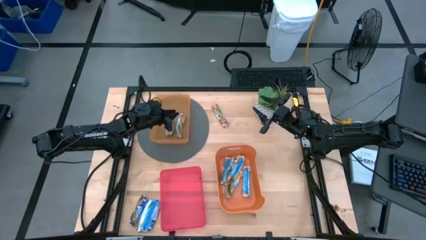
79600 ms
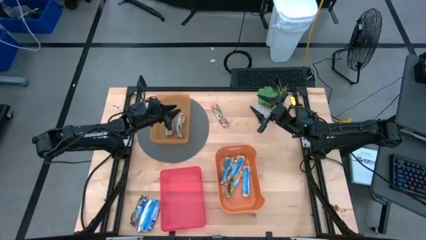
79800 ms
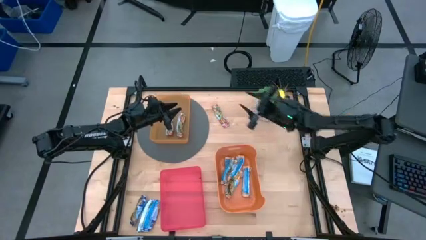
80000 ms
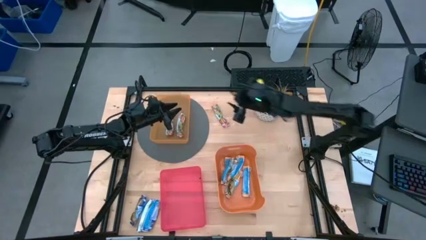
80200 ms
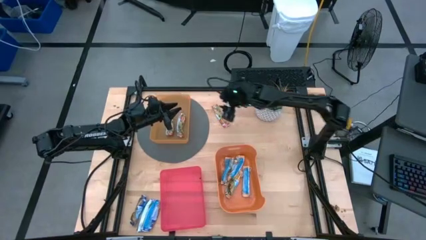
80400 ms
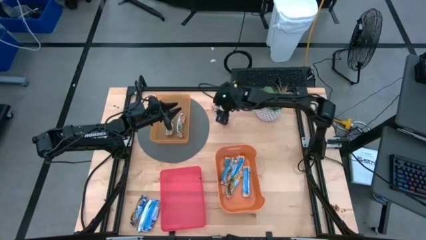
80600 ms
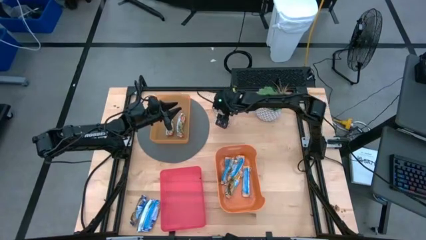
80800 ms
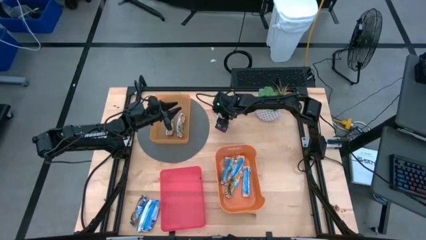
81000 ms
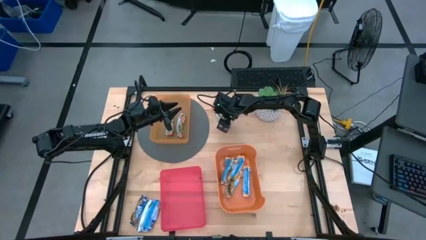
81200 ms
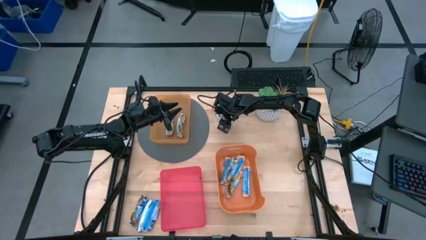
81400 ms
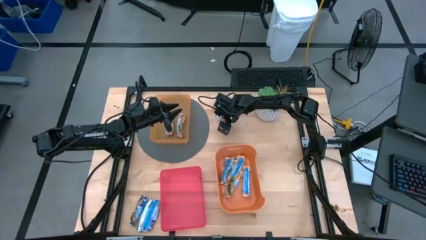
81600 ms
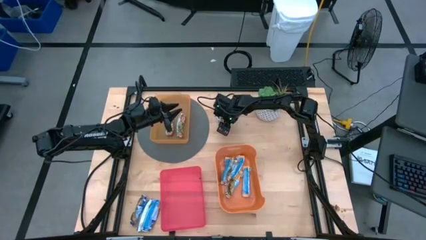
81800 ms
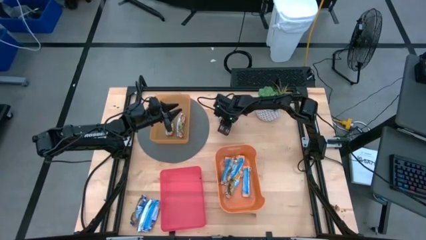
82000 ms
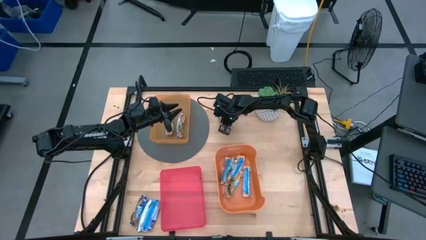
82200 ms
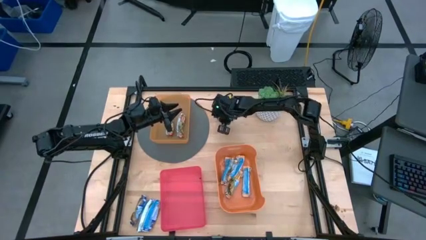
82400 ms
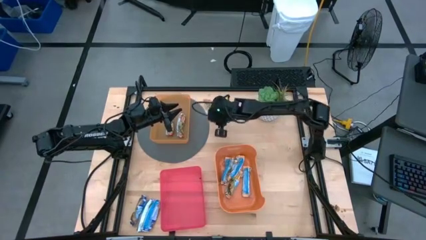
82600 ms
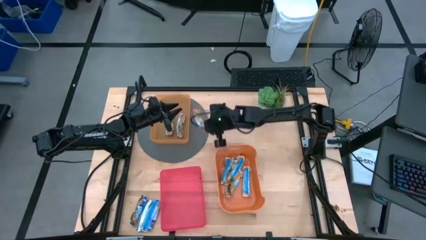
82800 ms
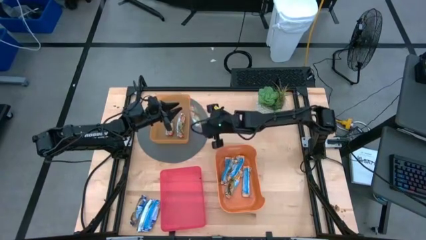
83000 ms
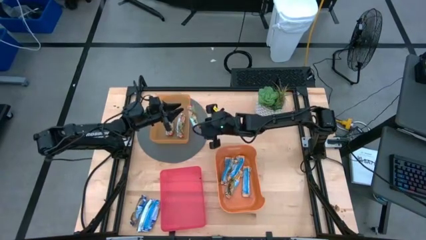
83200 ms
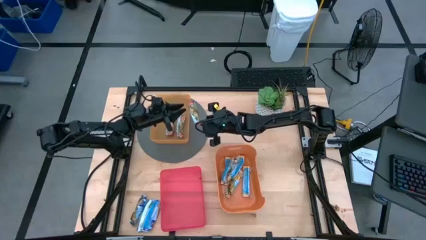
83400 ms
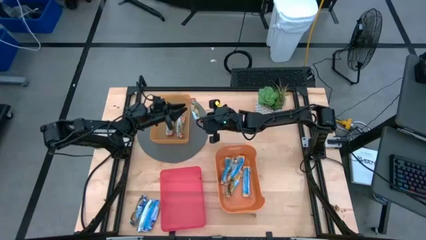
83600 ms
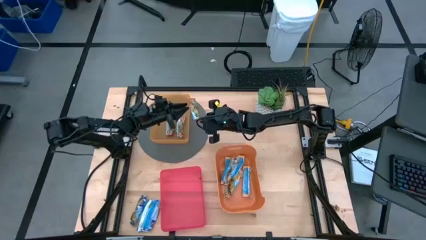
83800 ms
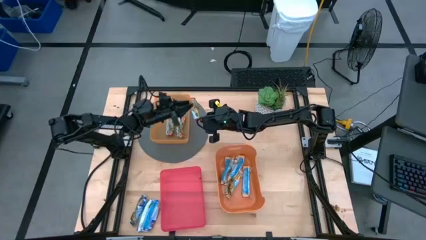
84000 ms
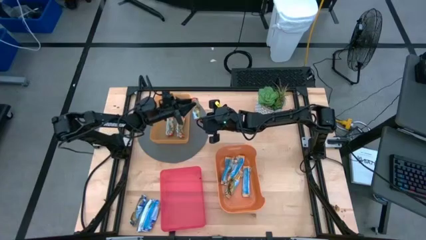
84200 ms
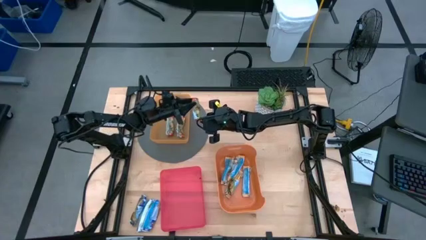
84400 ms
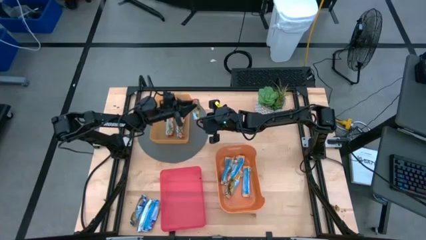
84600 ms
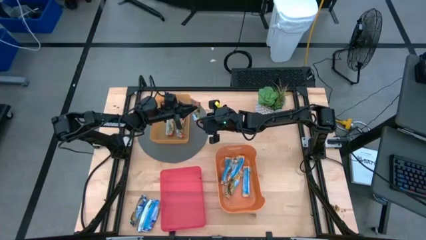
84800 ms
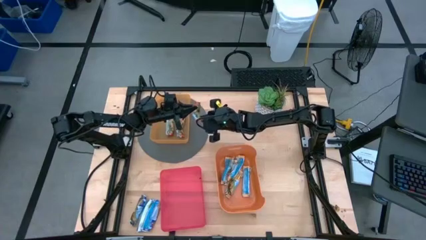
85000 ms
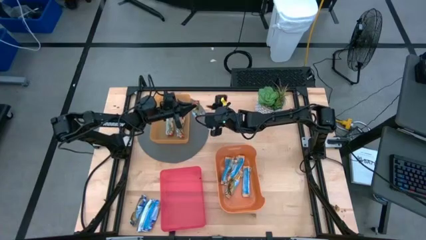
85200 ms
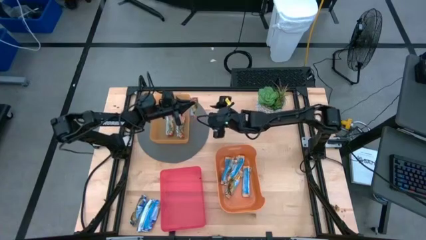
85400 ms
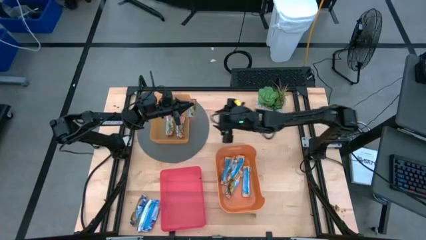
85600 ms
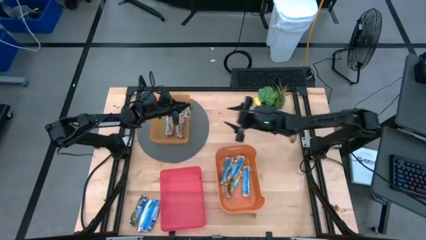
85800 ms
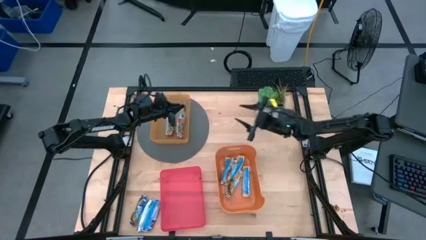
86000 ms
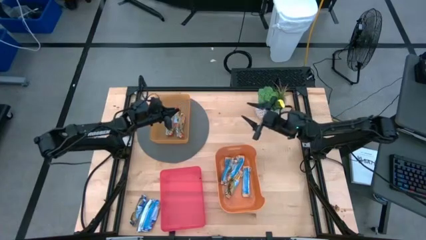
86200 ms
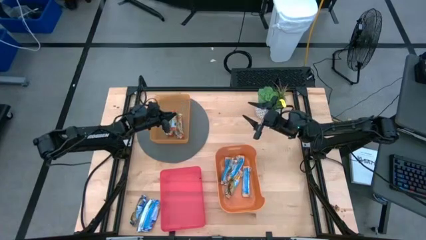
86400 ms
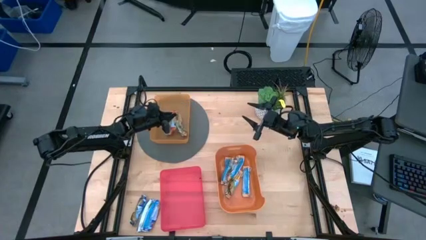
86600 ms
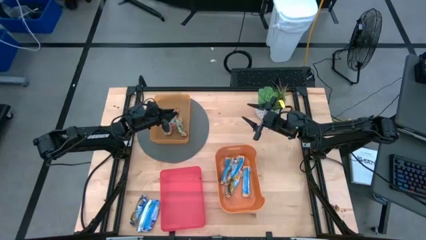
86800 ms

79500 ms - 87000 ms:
Task: Pick and place Granola Bars by type
Put the red granola bar into the light orange bin

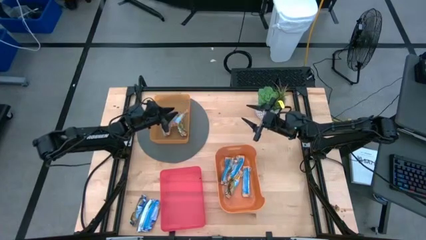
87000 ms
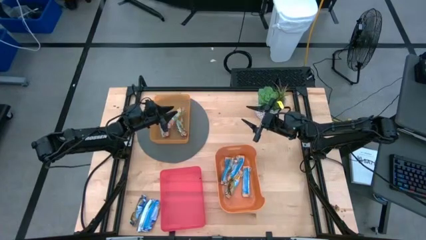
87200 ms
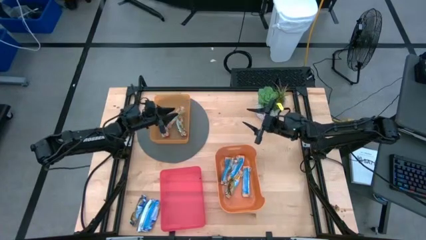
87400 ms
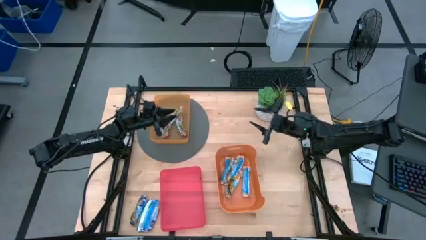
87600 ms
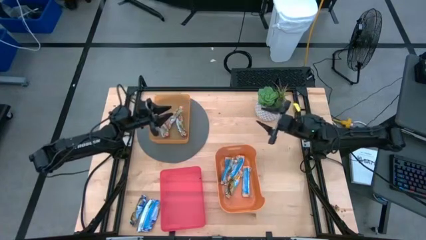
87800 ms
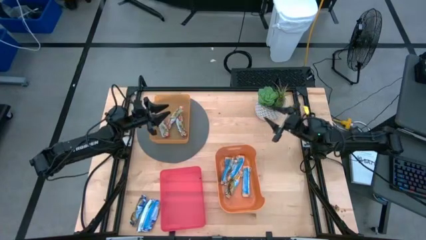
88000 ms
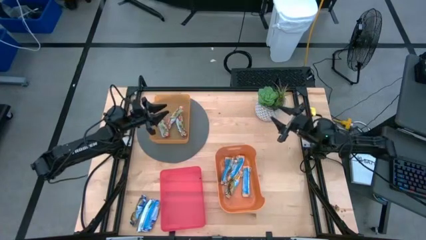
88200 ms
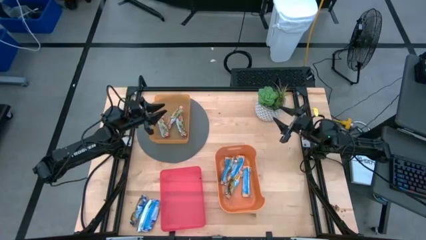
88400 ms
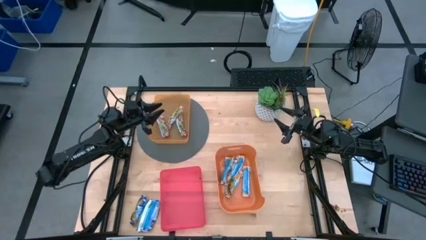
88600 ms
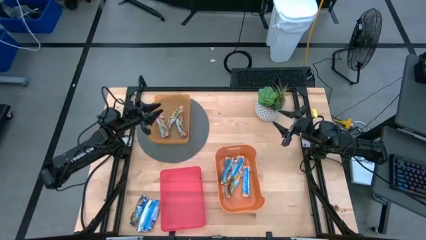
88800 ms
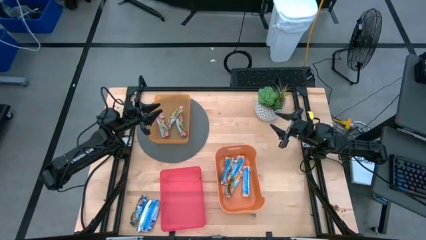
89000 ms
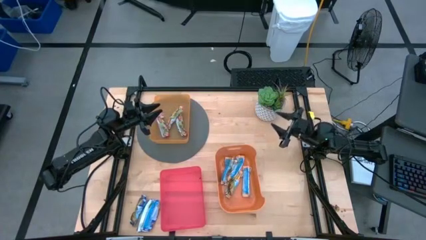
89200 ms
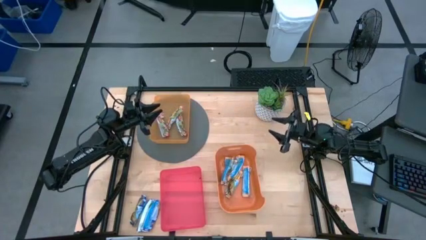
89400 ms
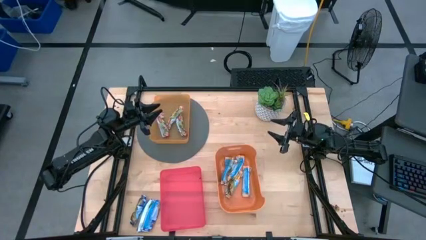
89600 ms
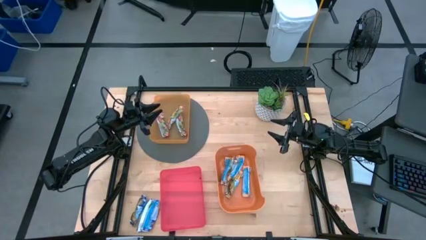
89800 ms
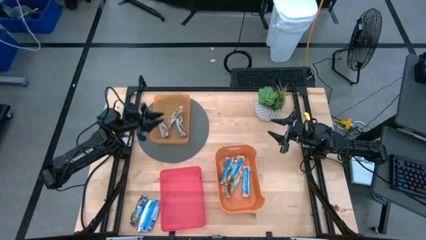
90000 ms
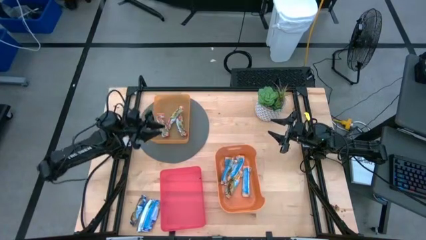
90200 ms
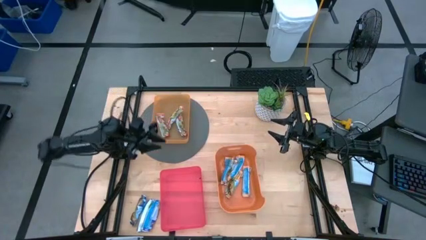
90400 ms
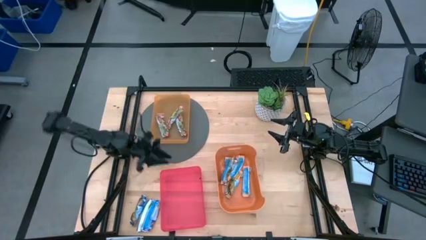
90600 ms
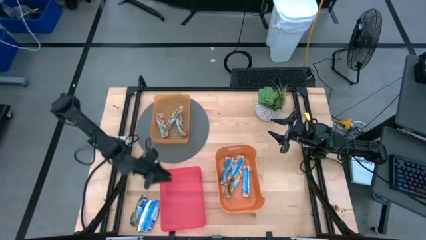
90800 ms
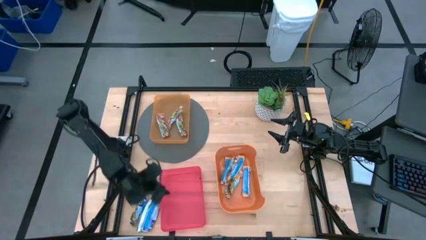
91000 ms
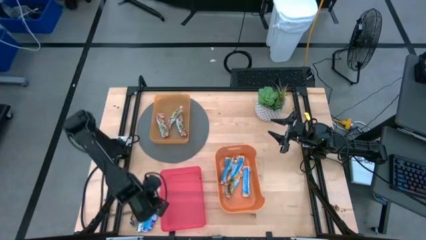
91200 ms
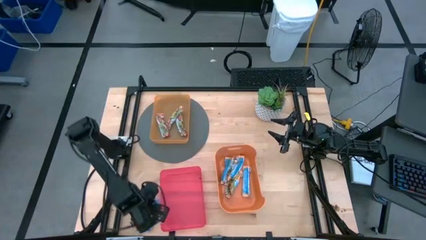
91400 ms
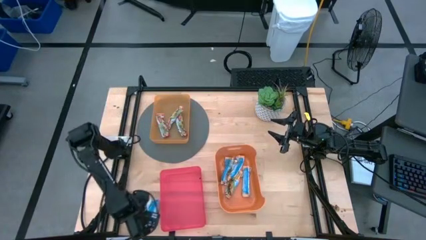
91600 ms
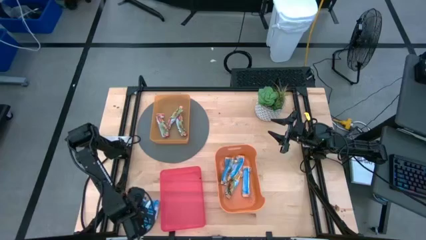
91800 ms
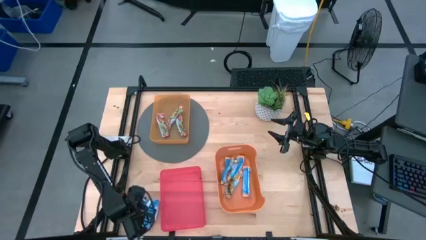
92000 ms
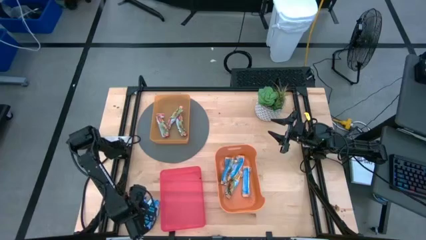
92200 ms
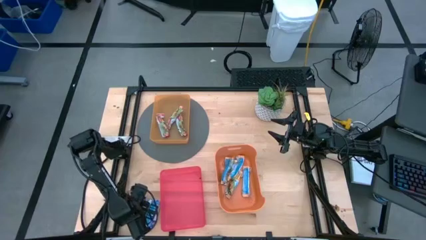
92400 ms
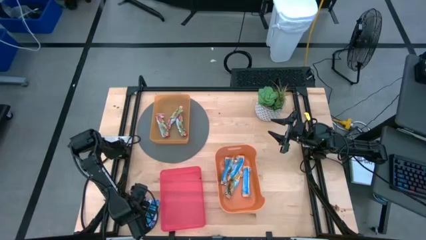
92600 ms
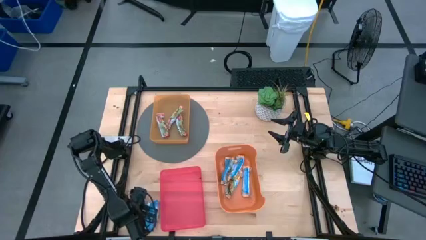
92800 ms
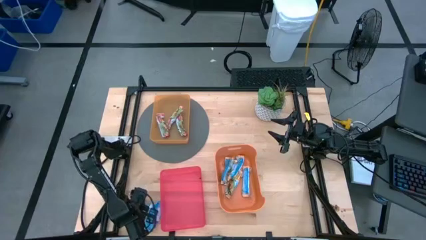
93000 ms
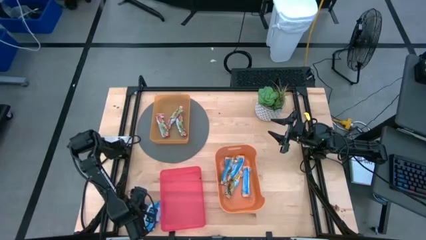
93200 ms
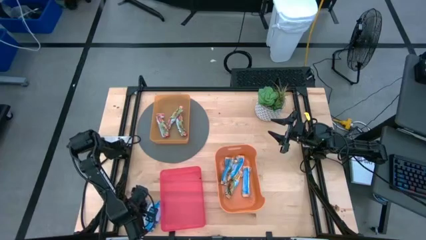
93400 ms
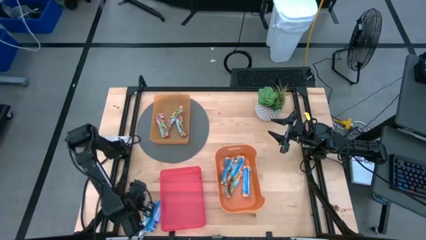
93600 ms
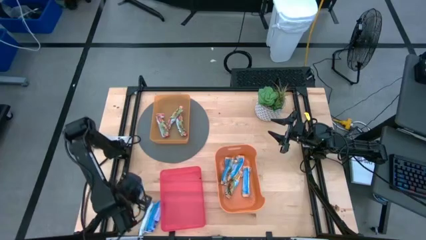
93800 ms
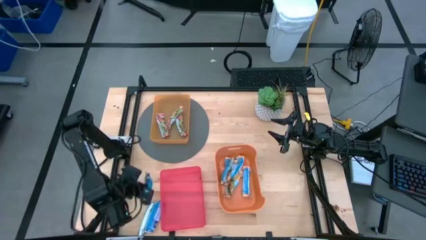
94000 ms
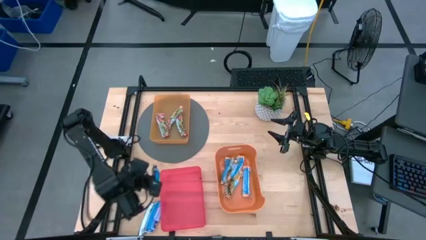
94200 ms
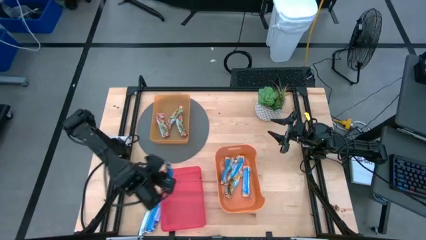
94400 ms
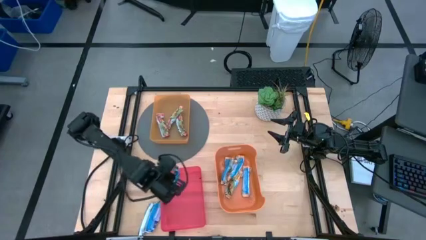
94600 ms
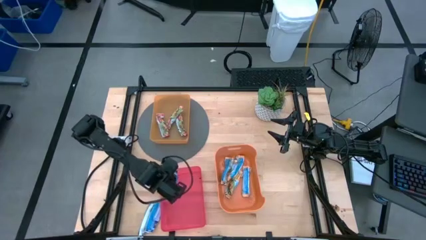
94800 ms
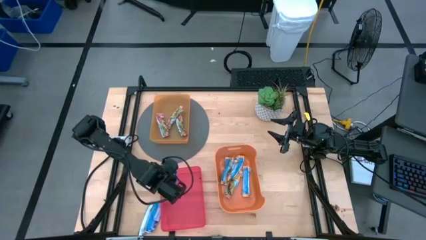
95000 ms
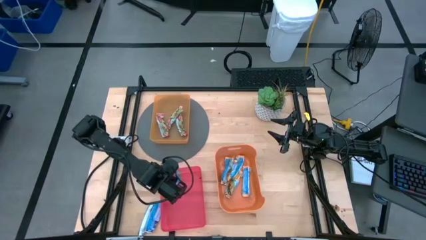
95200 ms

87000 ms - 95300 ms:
Put the blue granola bar into the red bin
